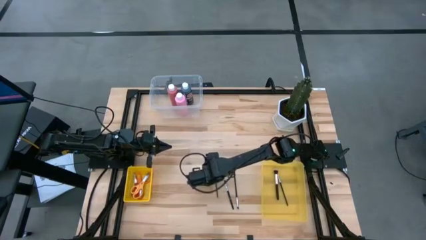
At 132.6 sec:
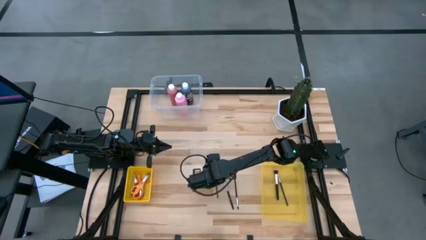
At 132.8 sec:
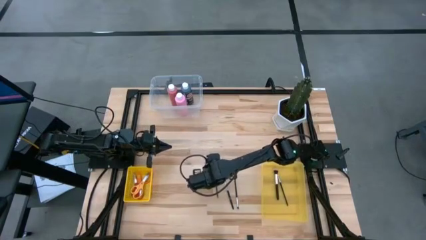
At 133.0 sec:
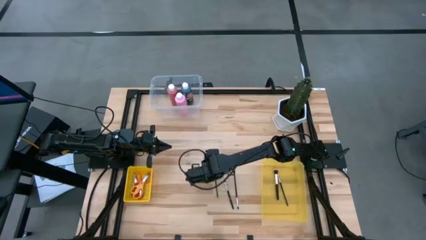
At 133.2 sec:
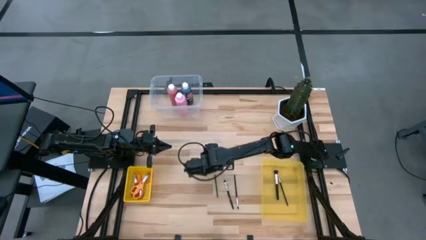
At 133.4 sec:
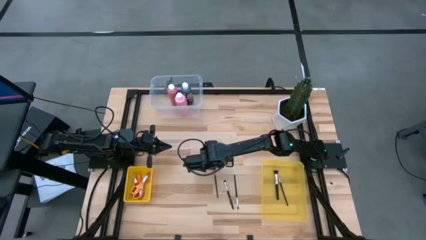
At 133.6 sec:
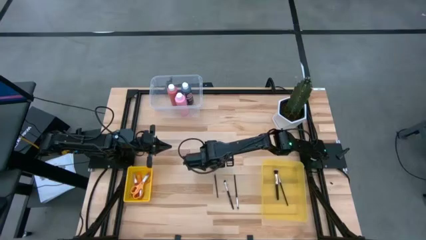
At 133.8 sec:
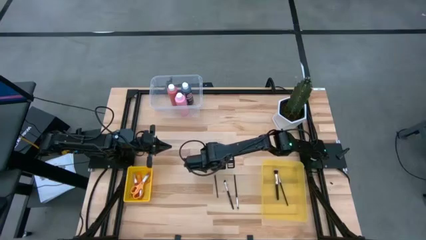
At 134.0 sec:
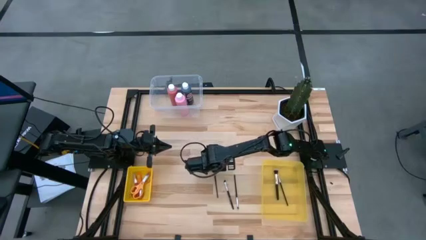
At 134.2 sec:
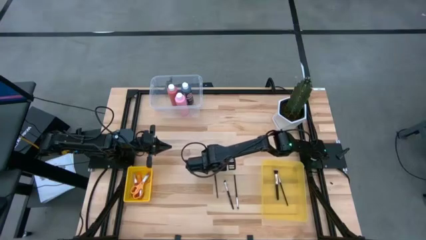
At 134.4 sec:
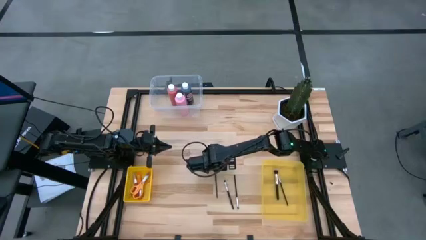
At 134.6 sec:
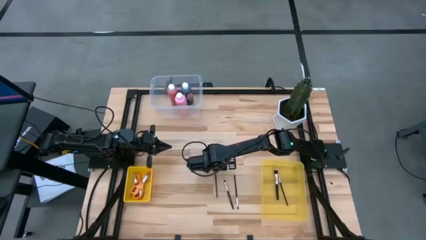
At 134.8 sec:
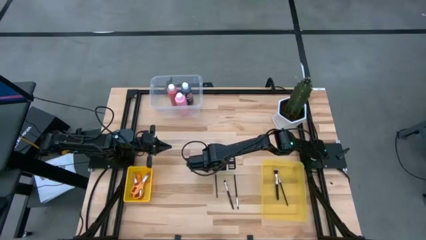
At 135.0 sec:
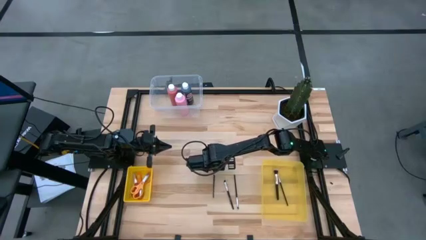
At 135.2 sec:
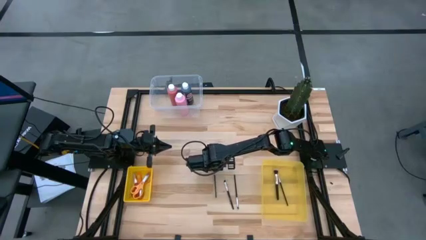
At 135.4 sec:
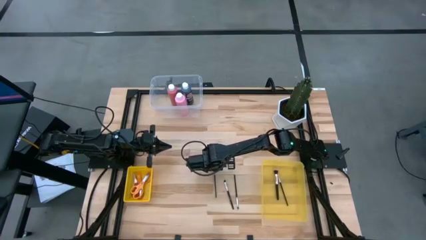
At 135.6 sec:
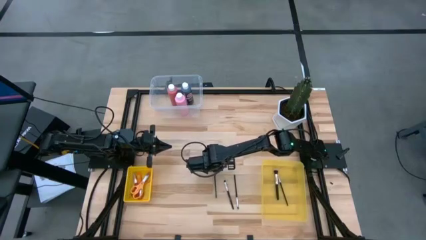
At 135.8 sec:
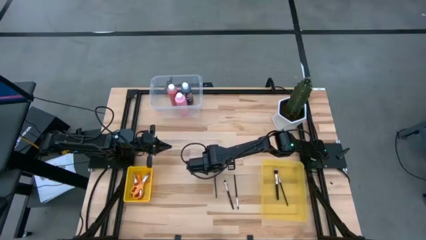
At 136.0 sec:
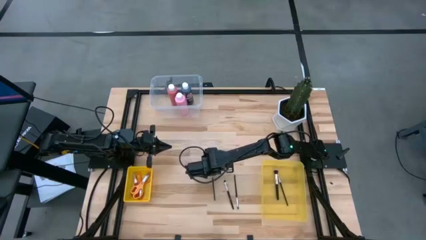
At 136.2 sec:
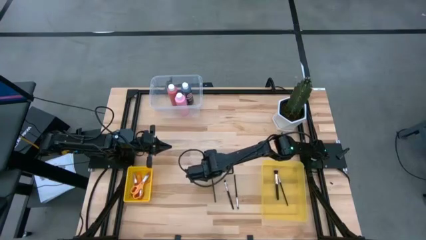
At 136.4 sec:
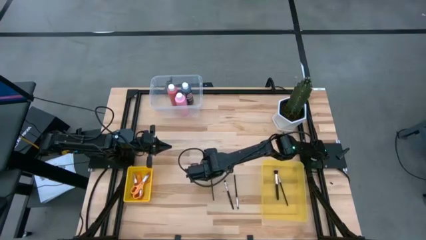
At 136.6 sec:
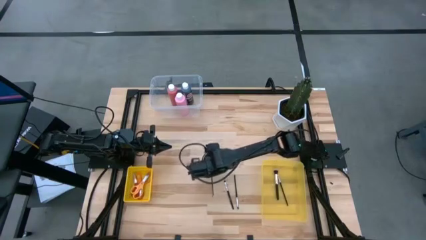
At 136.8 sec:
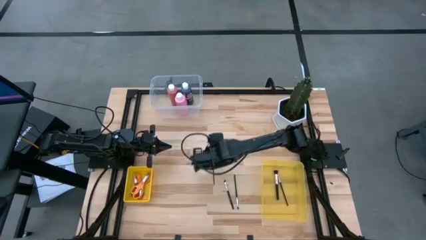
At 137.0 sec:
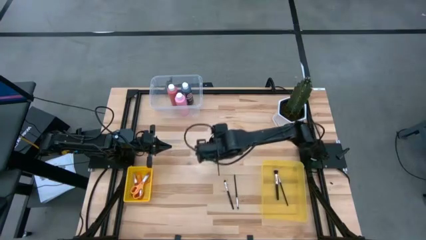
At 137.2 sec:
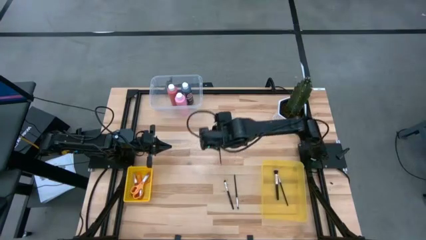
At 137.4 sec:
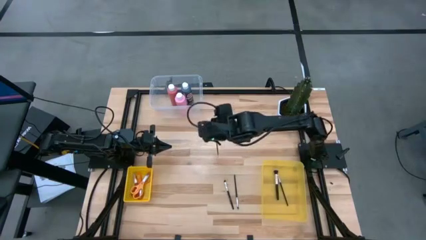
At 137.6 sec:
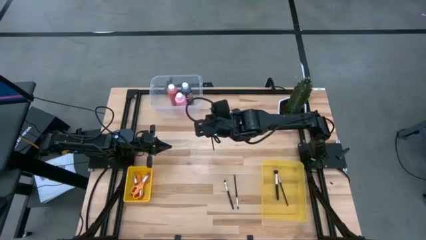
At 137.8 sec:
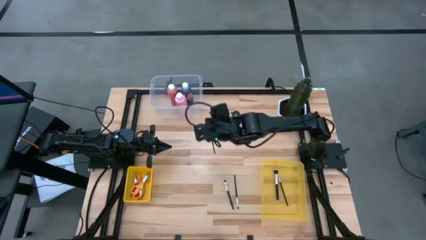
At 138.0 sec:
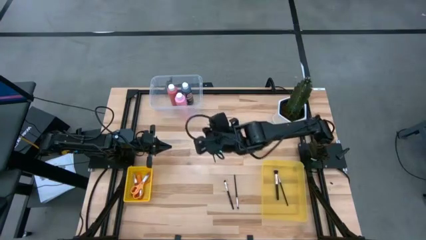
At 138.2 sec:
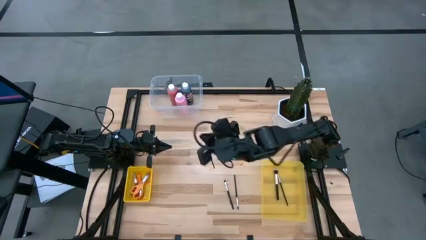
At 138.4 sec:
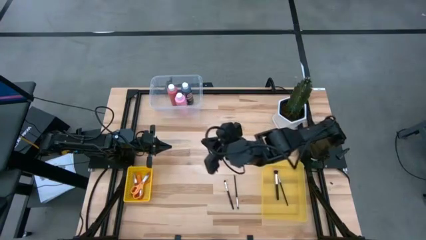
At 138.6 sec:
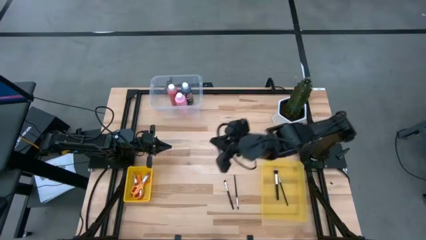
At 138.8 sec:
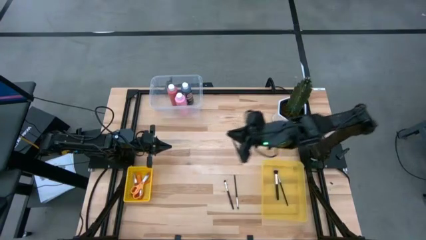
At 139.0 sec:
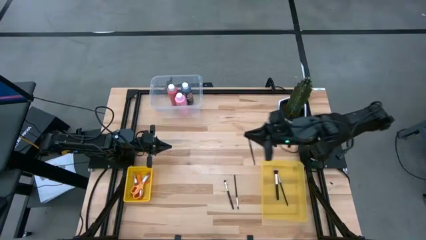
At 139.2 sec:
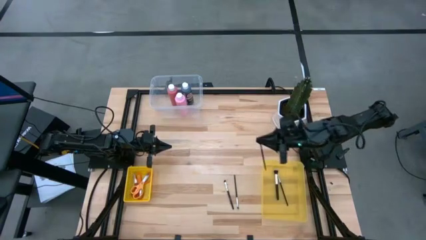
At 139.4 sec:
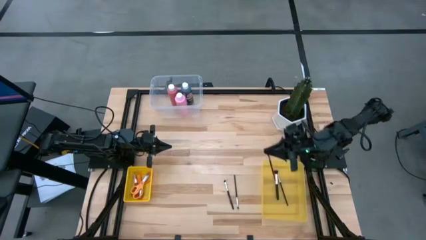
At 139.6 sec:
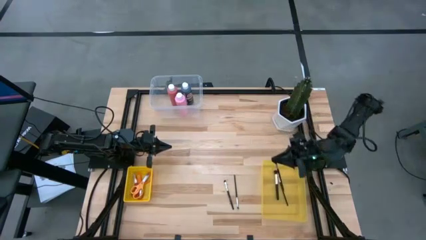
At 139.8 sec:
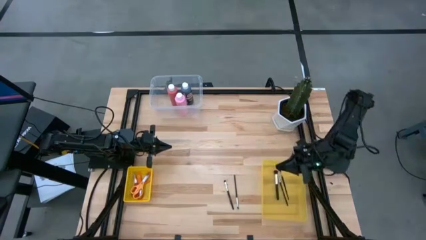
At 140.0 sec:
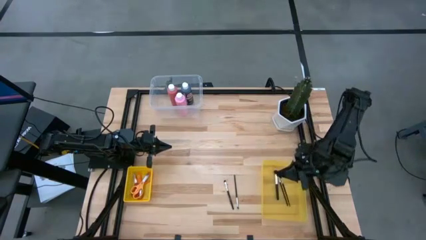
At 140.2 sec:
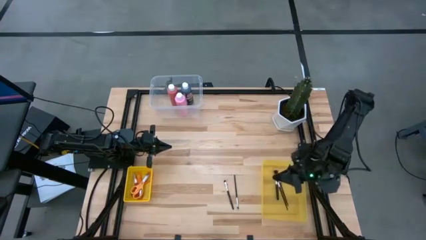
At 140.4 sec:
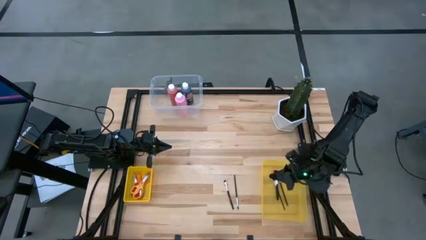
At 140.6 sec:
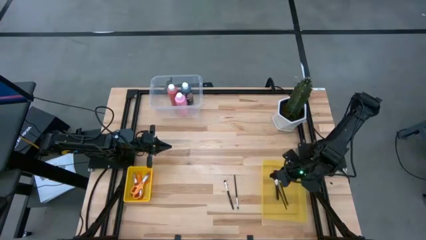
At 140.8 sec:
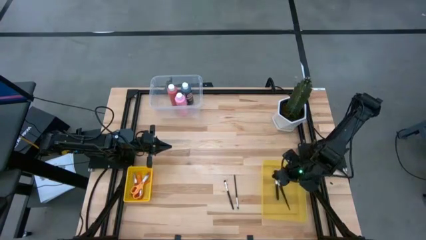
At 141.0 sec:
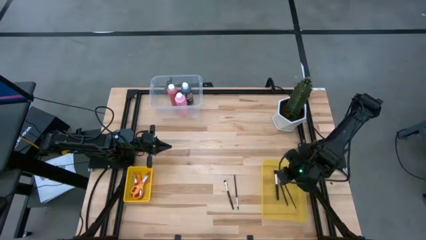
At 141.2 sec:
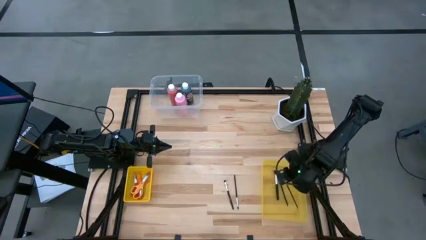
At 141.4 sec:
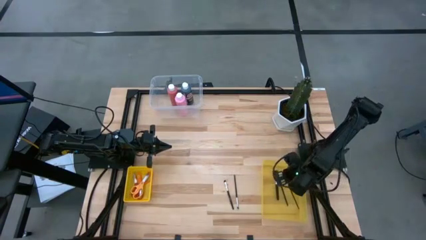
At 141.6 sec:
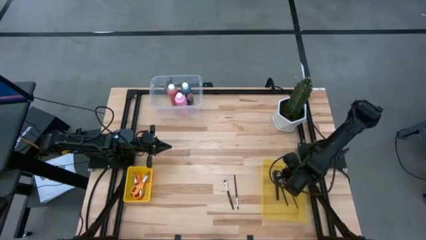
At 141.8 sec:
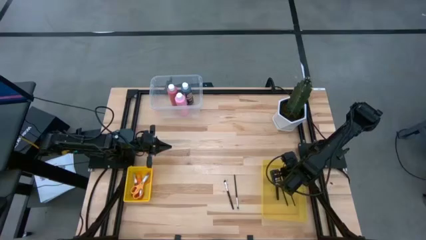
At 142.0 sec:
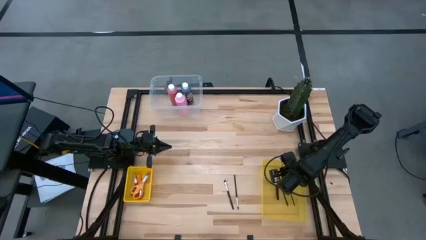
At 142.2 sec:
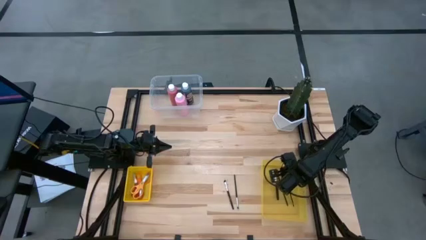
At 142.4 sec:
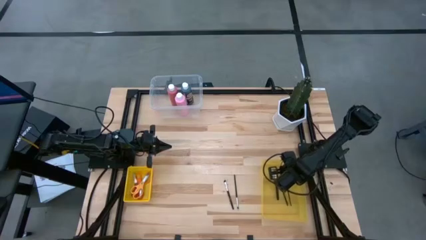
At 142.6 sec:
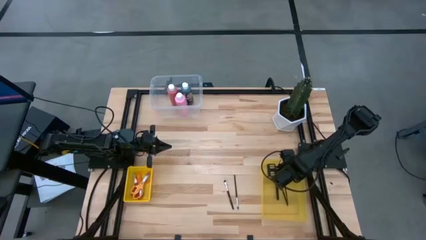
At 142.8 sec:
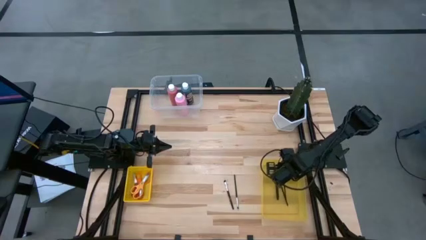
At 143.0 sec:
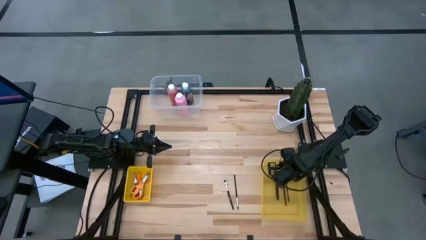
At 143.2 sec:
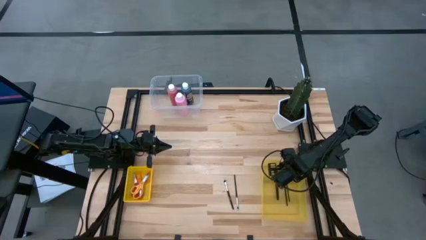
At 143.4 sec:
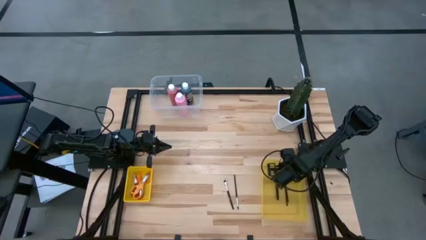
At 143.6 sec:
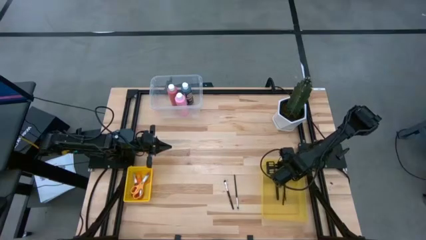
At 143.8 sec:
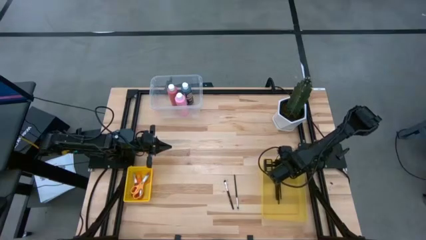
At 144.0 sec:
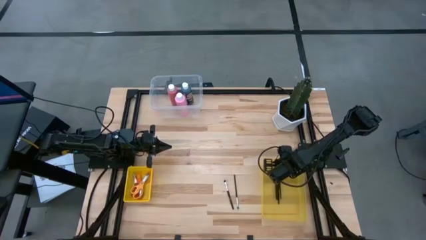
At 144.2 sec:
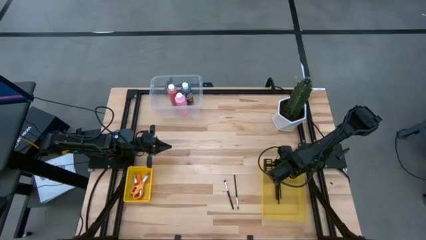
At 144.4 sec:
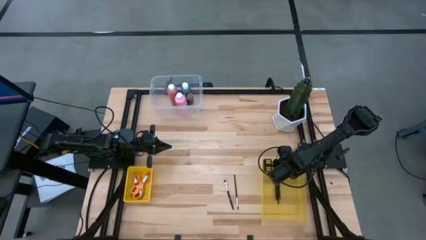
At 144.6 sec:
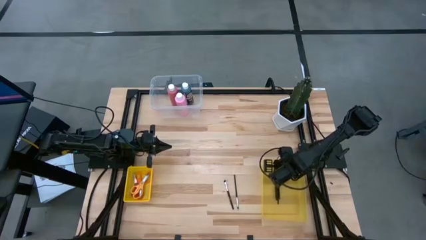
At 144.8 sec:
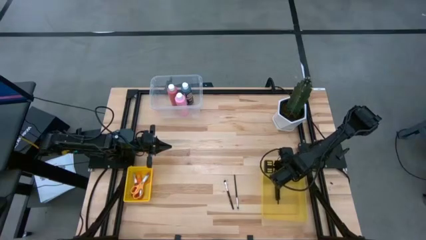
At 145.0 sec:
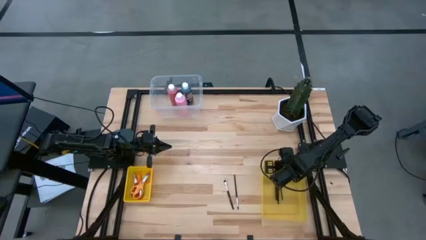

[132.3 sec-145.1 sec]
Task: Pick & Place Paint Supplies
Put the brow brush into the yellow bin

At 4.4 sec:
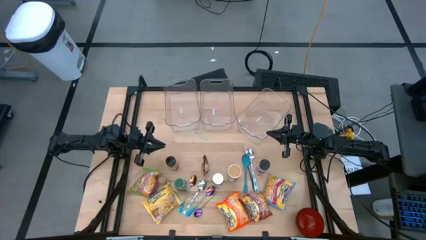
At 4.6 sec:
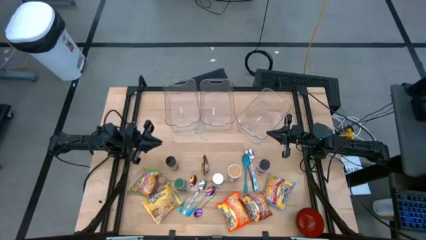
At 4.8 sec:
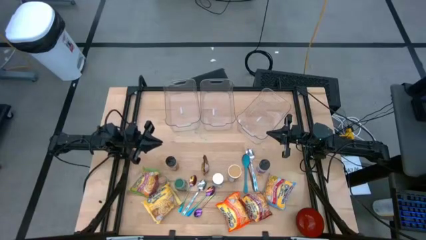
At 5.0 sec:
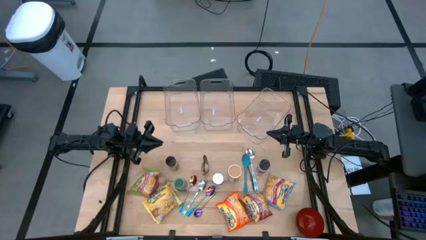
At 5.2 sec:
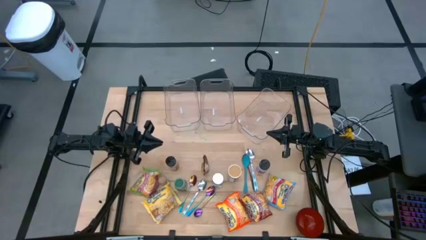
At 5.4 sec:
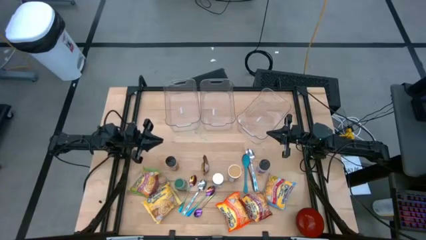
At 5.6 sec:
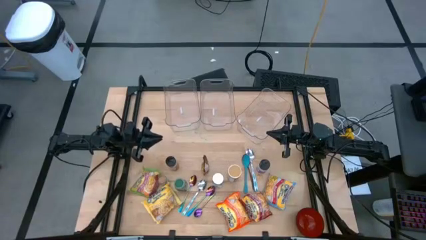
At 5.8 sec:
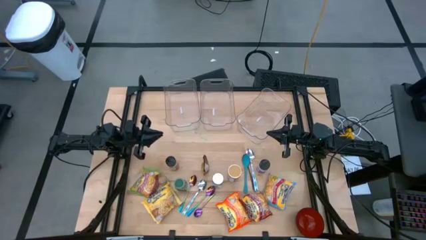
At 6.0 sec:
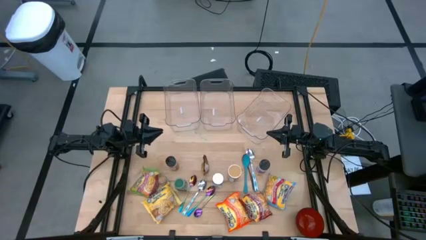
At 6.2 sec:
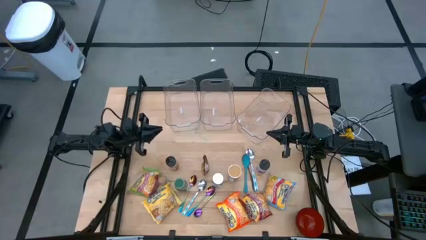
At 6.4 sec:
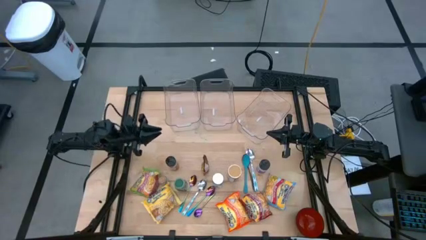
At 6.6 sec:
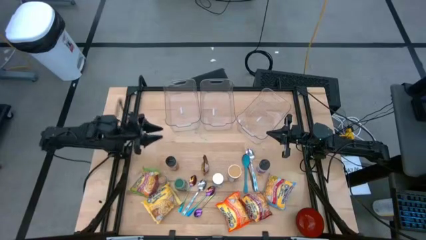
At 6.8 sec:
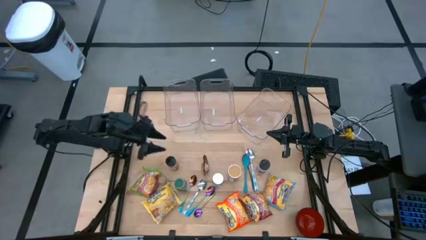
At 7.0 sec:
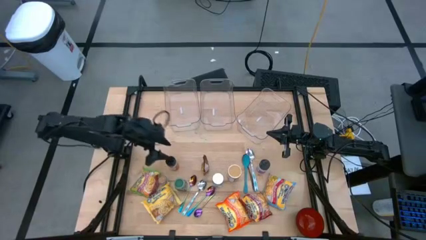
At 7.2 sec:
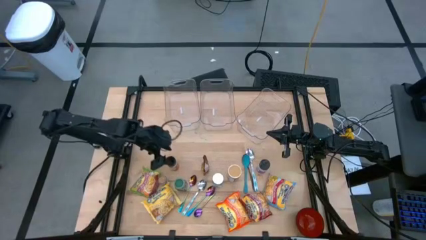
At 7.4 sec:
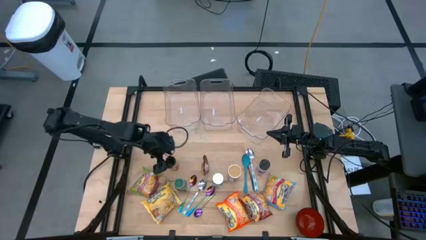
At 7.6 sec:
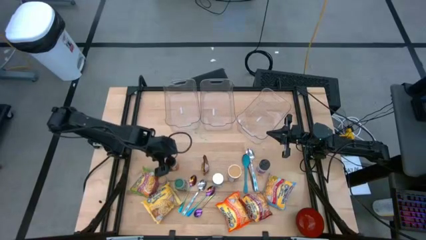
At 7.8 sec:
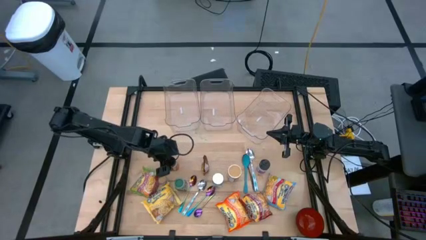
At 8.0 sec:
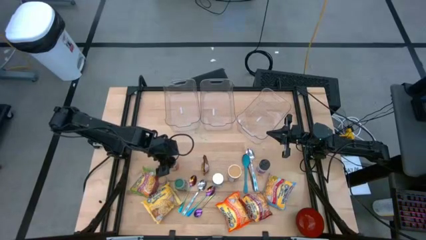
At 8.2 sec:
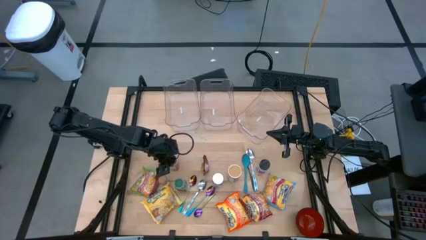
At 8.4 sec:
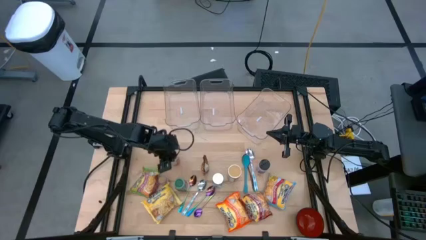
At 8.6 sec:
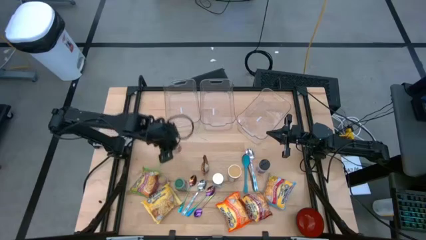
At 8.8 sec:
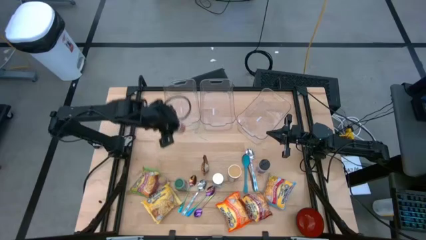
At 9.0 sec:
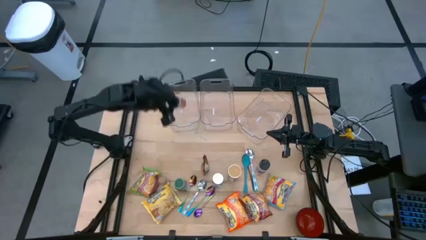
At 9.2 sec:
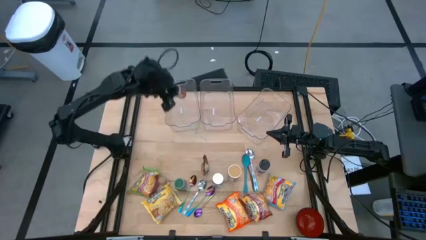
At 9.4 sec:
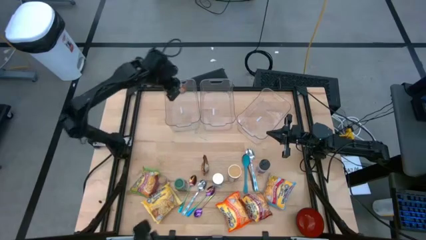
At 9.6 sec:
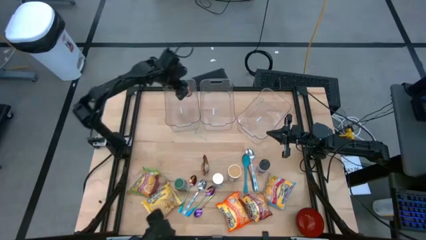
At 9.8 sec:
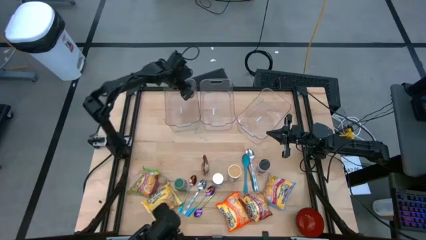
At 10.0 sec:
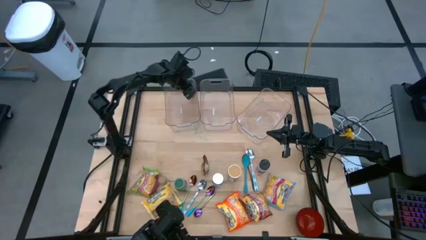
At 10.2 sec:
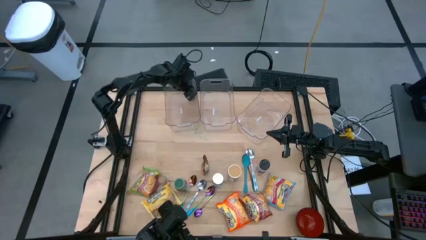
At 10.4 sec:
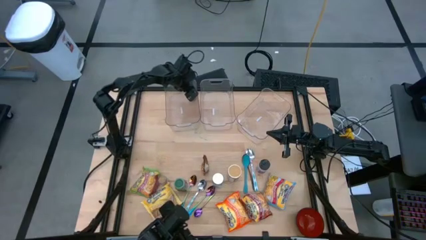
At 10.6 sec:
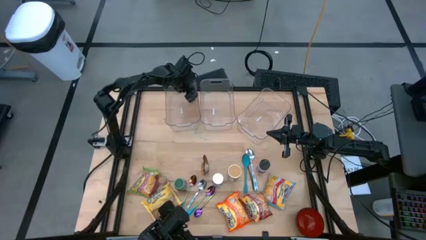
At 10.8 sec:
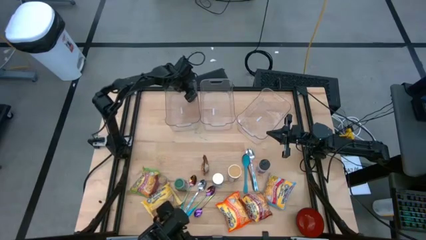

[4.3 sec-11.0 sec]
Task: Pick & Place Food Item
Put the orange seasoning bottle into the left transparent bin
